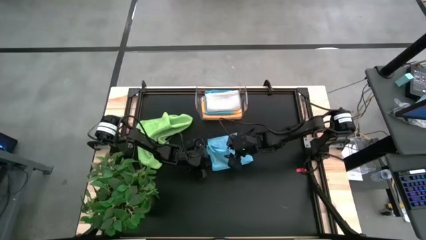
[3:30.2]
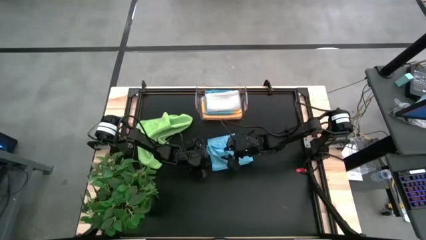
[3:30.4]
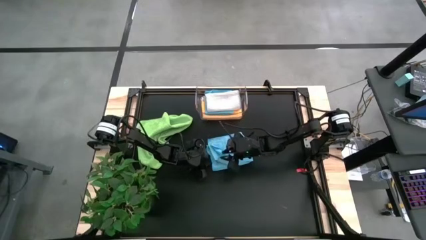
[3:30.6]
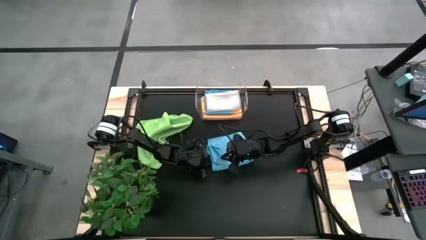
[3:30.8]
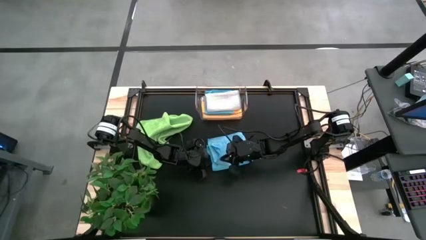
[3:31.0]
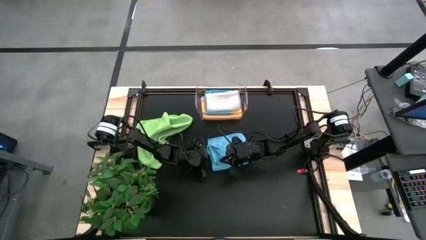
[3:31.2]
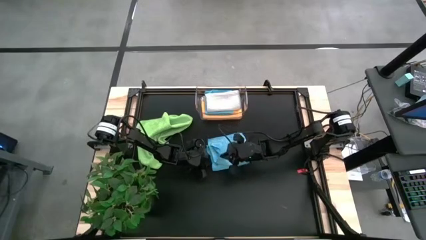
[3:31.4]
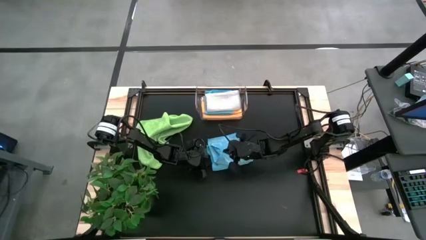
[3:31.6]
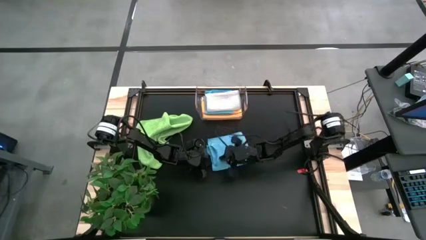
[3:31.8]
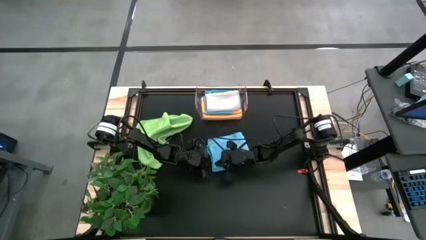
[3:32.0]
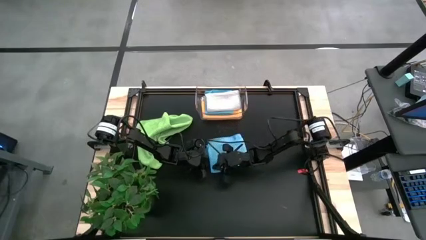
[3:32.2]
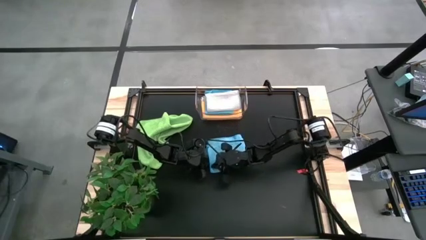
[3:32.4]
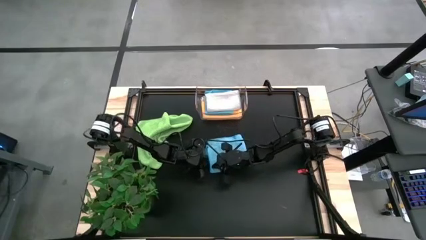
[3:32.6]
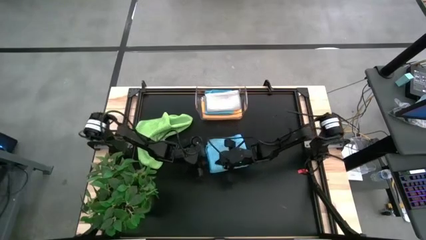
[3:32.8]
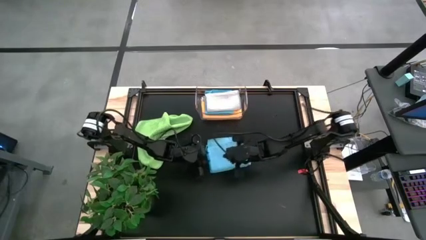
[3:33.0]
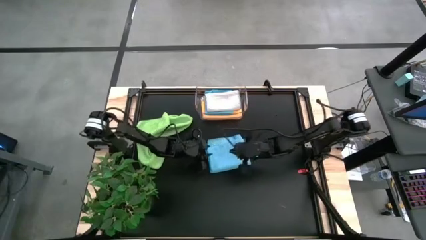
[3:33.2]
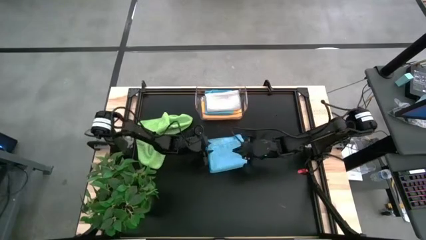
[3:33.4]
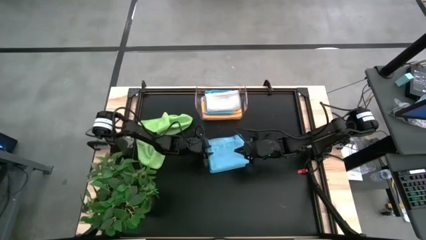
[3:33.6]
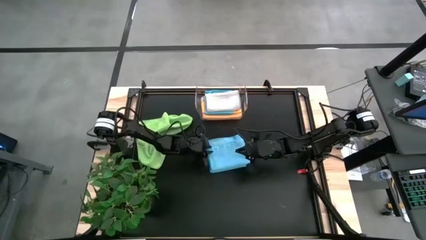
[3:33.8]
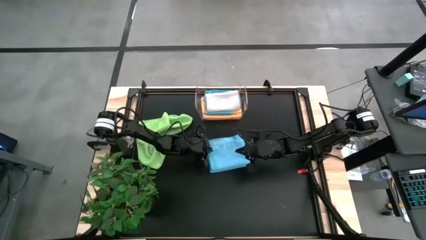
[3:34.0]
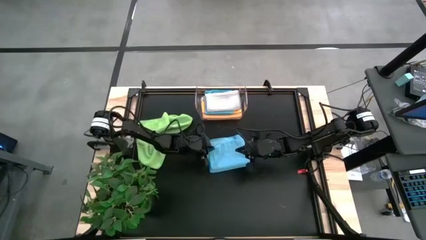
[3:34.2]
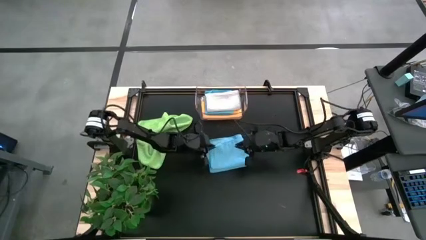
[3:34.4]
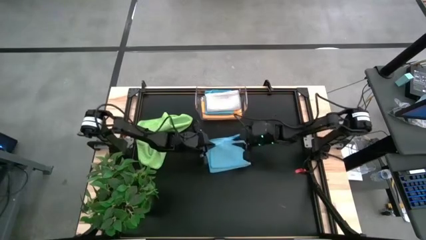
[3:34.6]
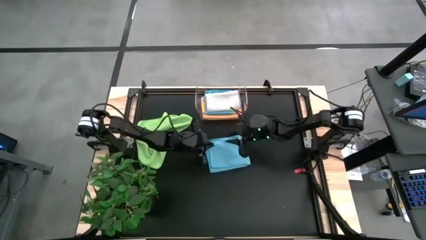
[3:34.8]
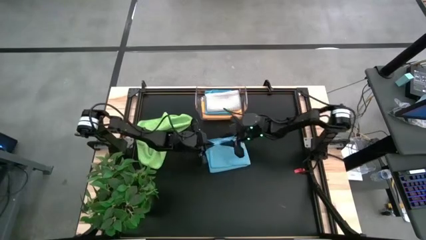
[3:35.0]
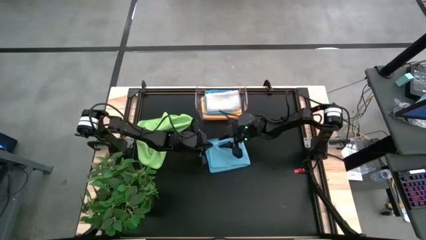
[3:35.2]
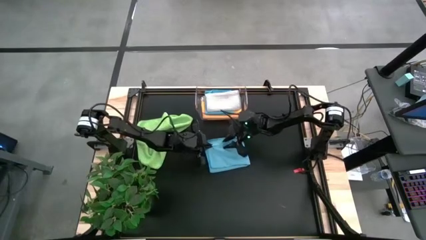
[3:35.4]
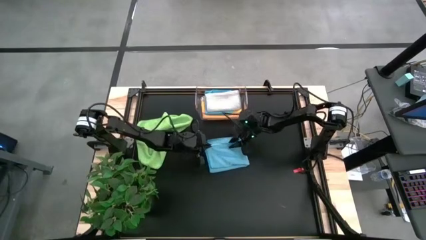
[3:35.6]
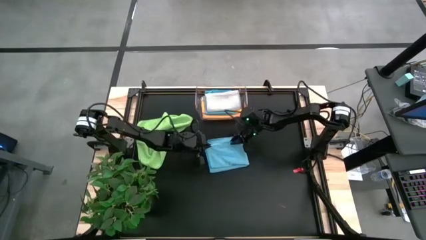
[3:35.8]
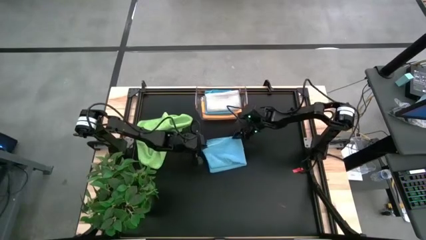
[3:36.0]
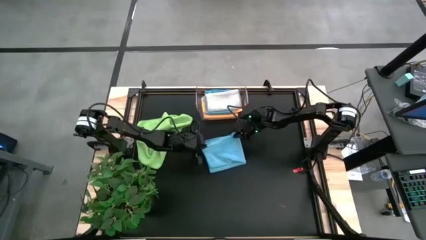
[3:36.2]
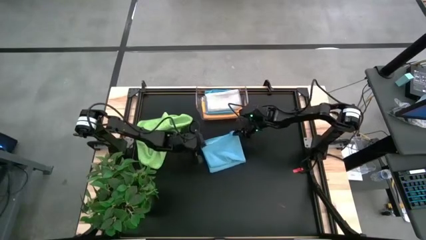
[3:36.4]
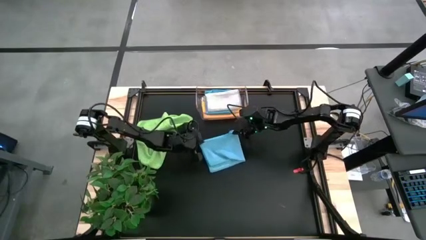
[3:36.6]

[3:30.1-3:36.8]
Task: Fold microfiber towels
Fold the blue microfiber cloth

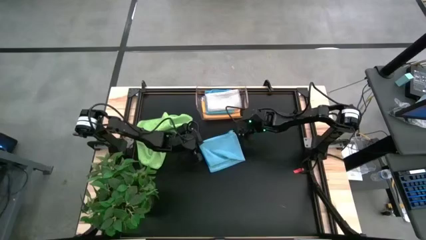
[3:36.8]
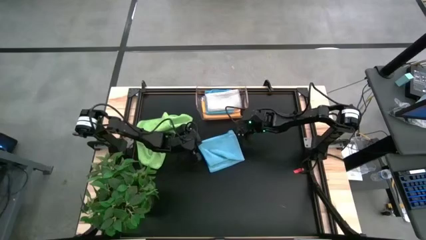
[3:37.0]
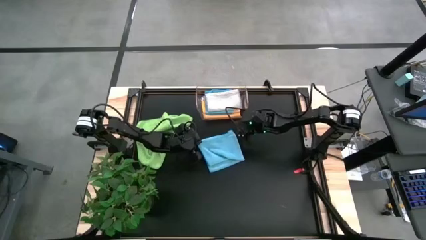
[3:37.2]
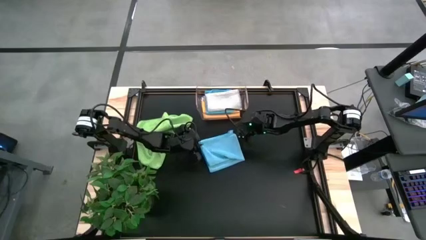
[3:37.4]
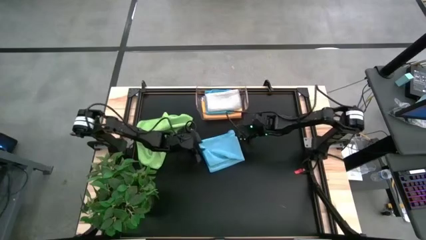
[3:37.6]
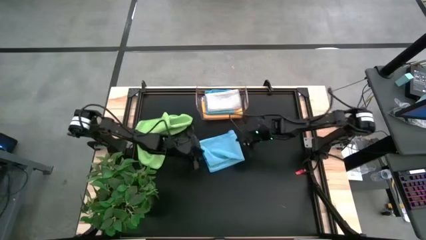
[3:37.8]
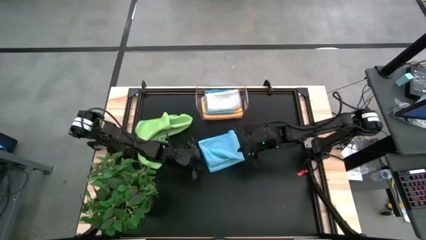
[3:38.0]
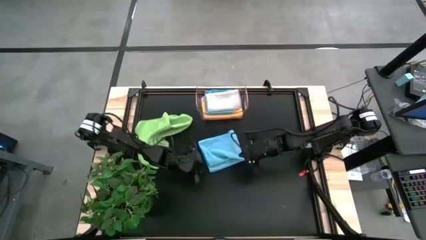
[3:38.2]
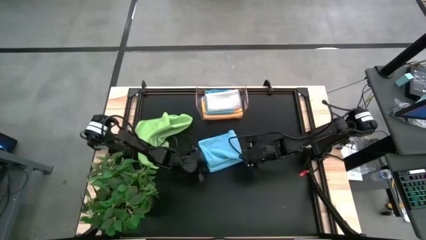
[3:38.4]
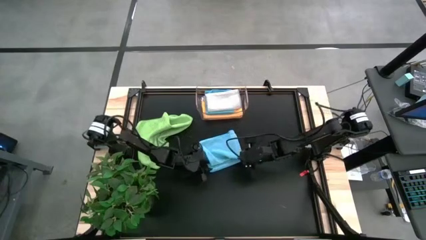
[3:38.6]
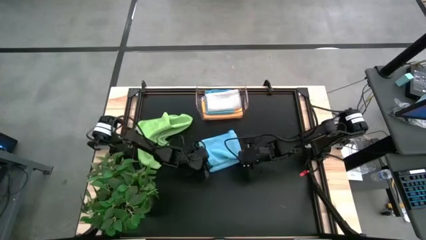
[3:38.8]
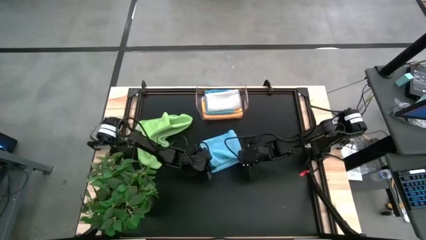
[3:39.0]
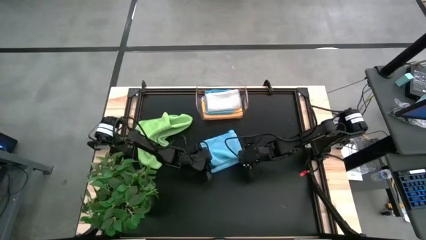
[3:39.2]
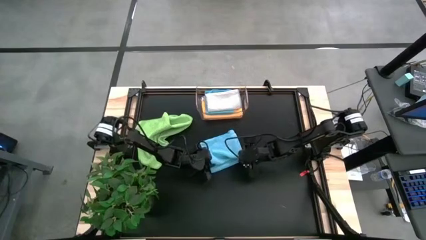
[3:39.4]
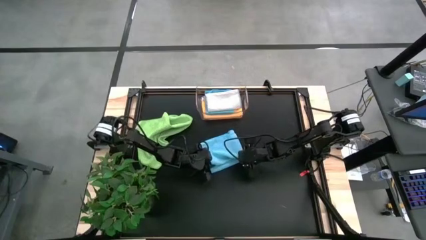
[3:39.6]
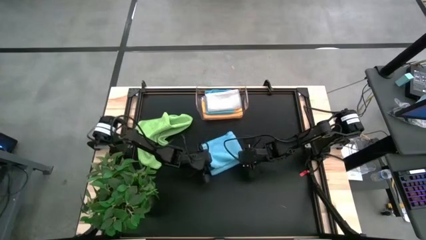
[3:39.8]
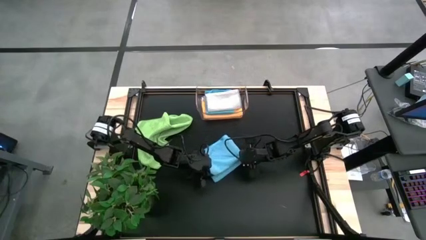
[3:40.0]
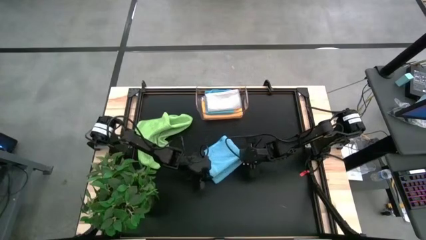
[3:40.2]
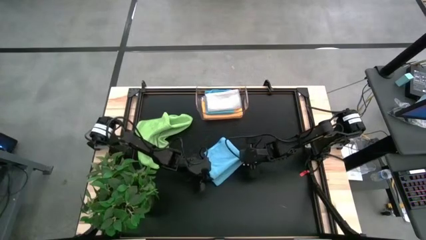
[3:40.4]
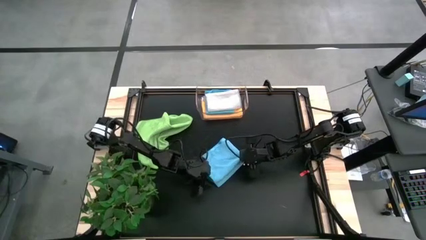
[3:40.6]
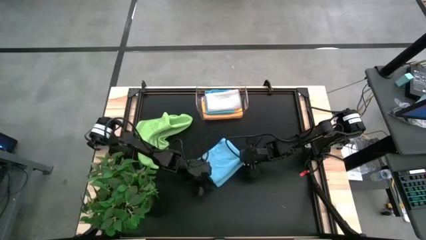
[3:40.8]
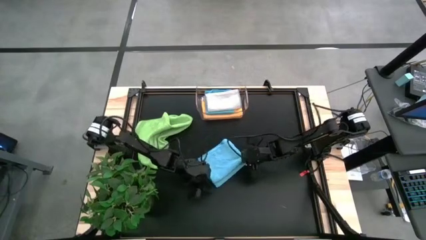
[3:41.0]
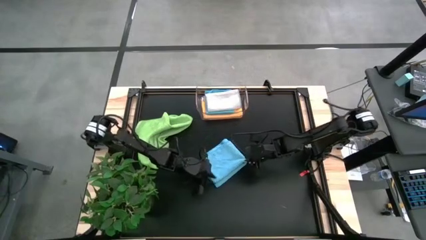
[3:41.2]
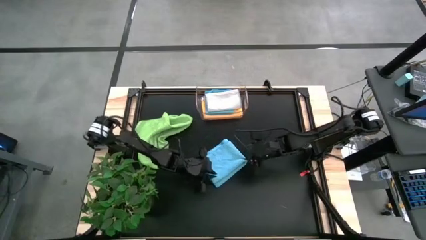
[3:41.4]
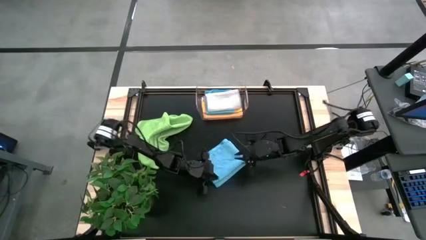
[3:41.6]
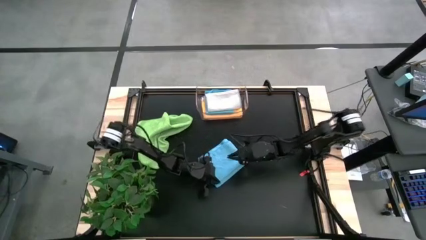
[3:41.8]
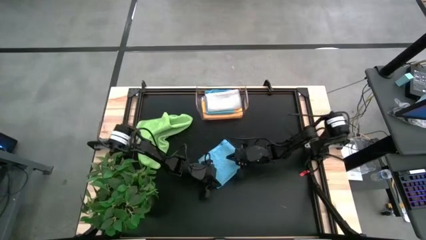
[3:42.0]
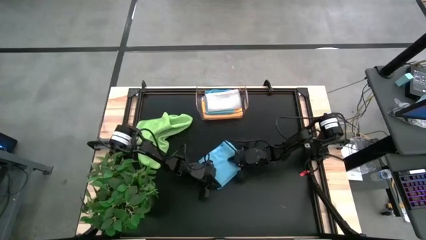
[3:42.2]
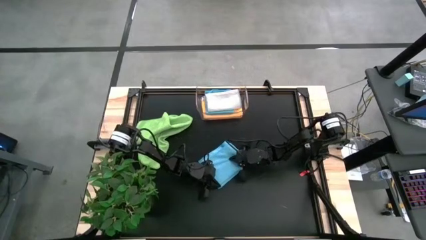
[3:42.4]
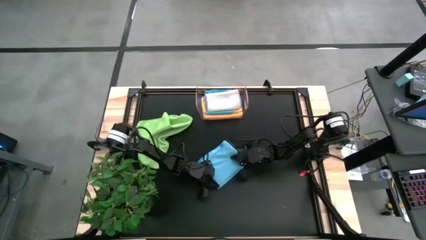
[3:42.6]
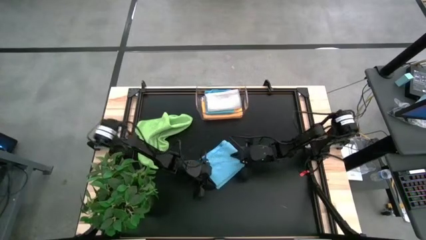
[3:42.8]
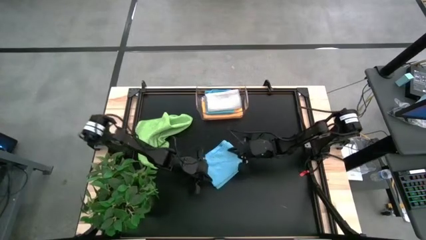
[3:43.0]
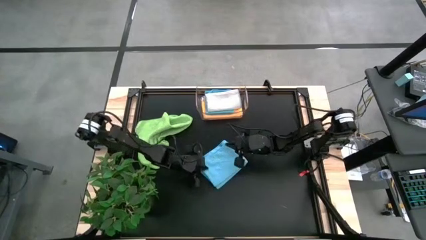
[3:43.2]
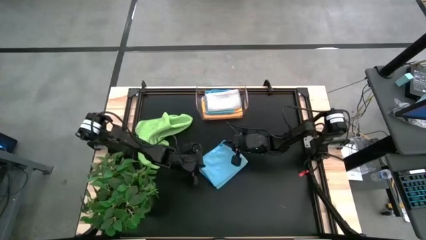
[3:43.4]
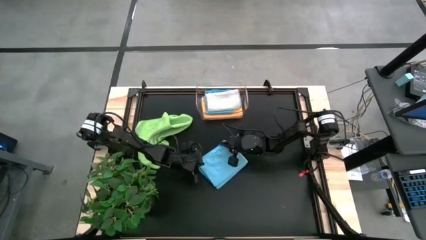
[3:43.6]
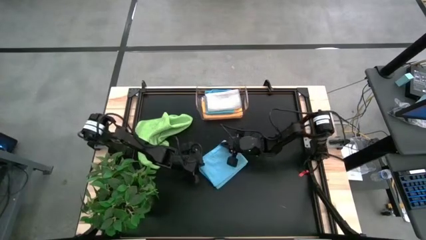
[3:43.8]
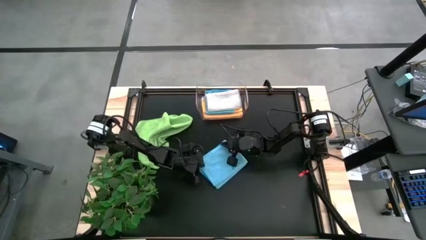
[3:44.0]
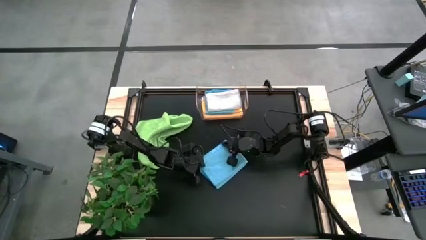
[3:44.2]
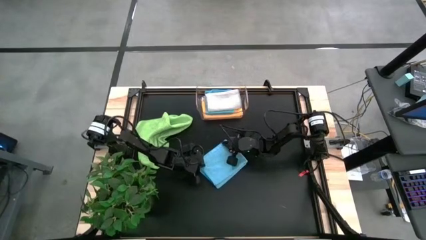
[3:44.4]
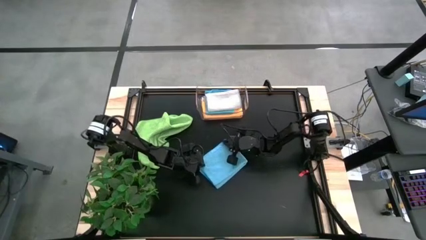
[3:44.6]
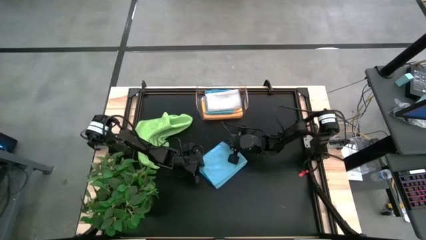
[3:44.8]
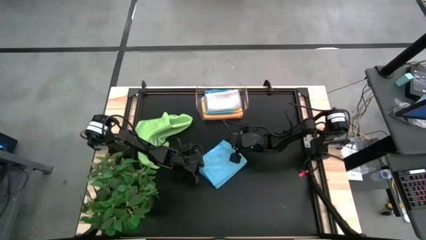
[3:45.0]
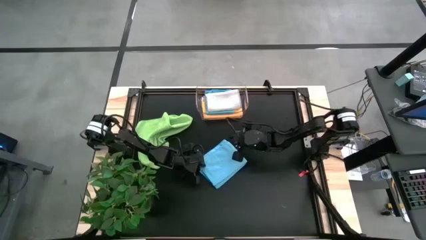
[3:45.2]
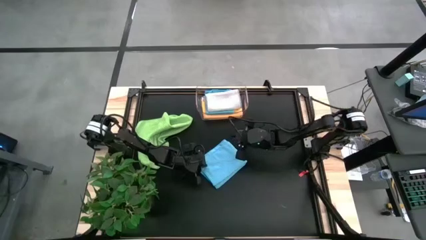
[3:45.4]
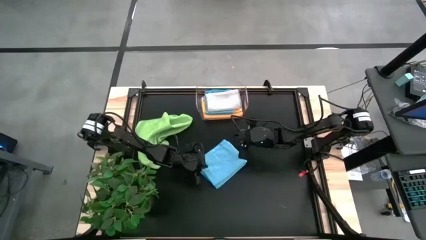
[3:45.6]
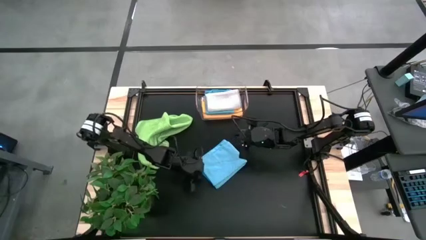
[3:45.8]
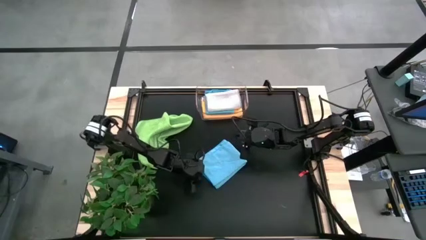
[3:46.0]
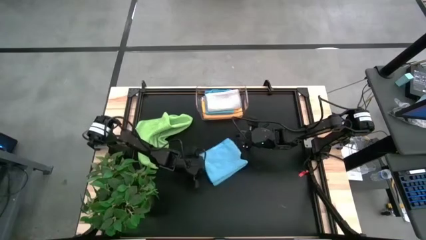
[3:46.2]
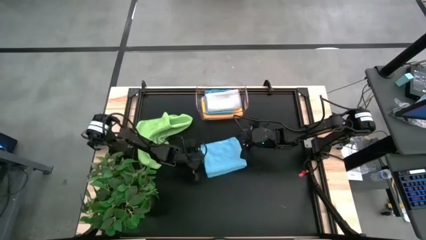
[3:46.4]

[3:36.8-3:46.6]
Fold the blue microfiber cloth
